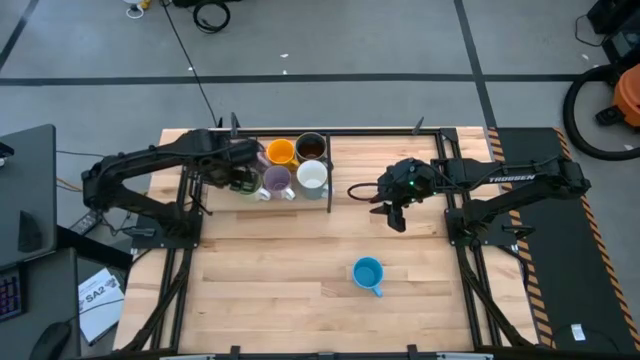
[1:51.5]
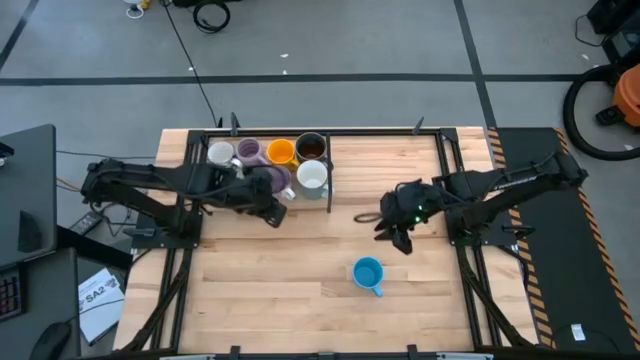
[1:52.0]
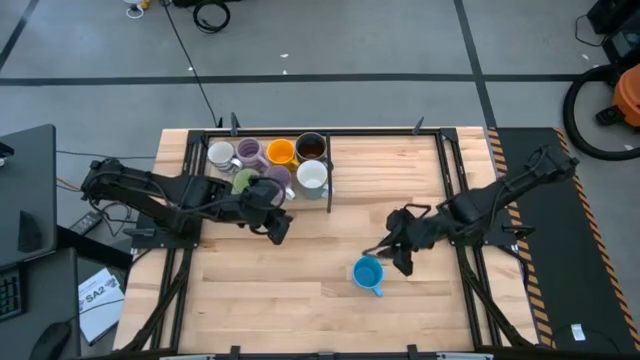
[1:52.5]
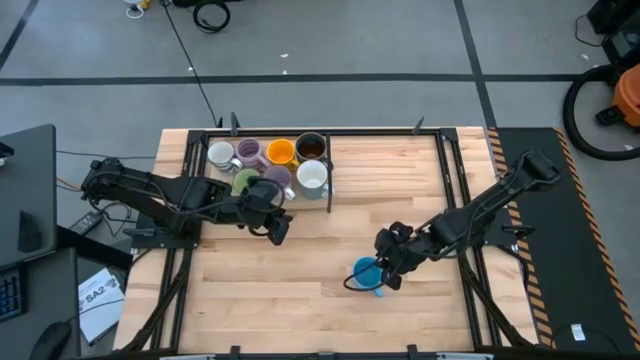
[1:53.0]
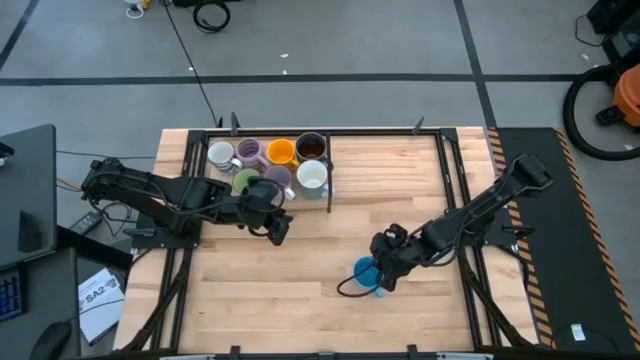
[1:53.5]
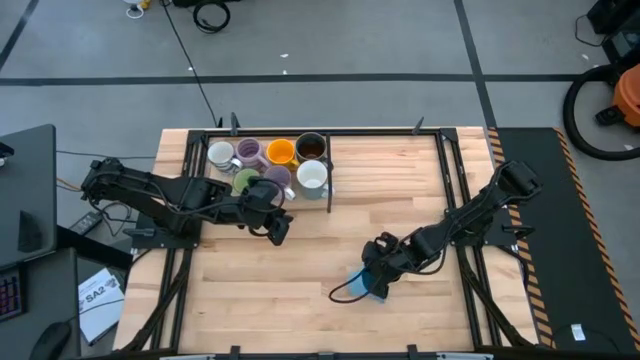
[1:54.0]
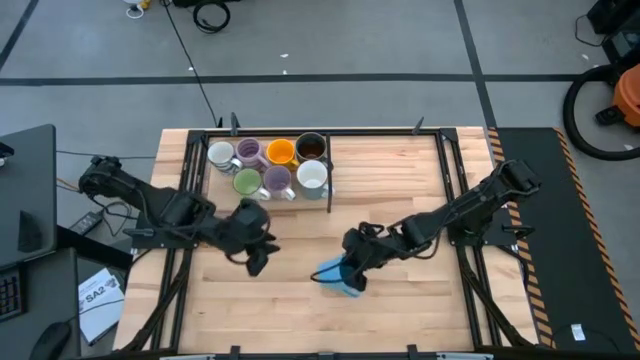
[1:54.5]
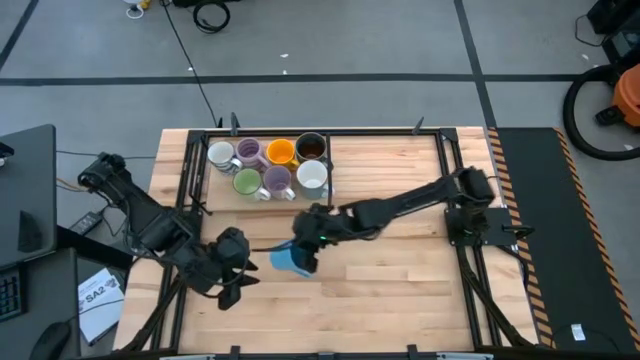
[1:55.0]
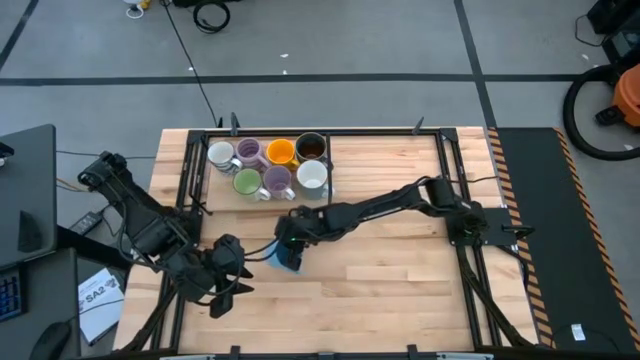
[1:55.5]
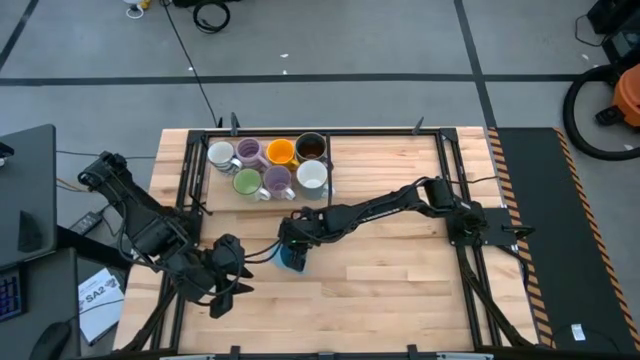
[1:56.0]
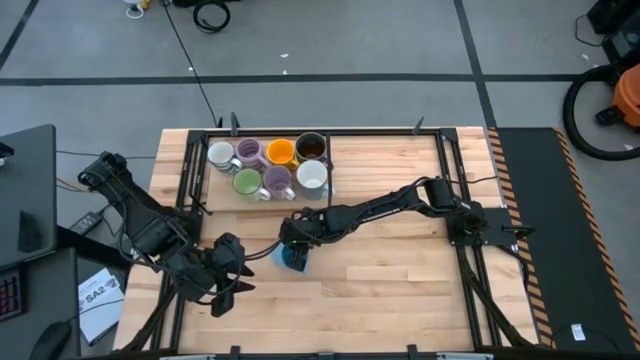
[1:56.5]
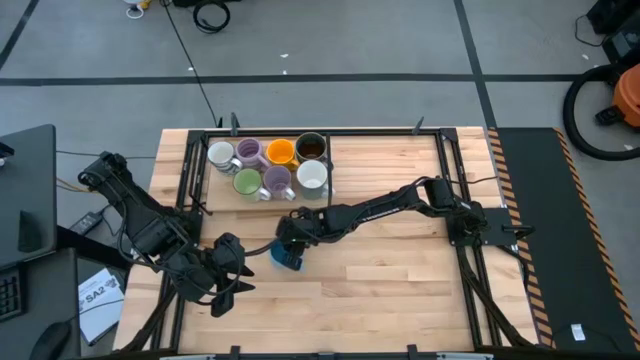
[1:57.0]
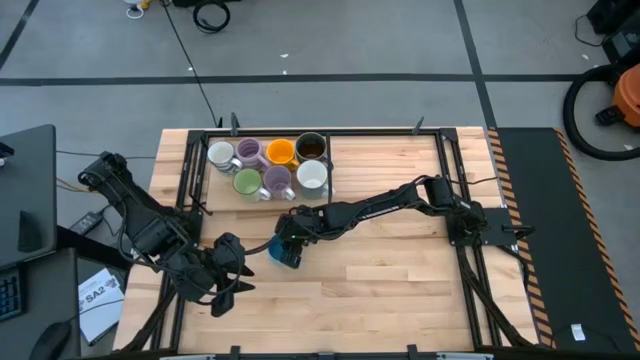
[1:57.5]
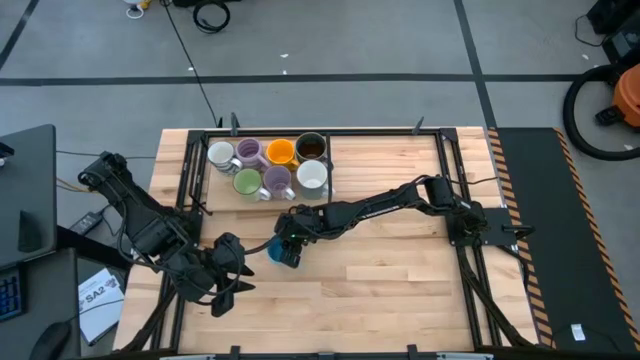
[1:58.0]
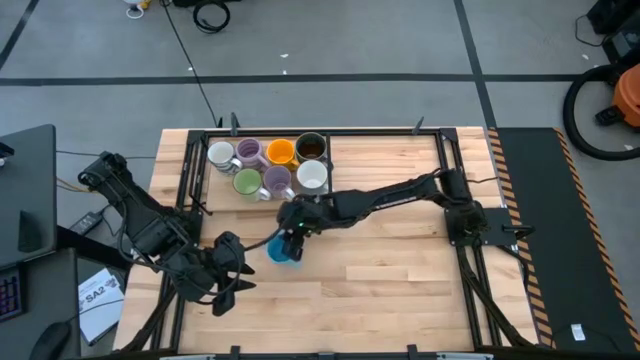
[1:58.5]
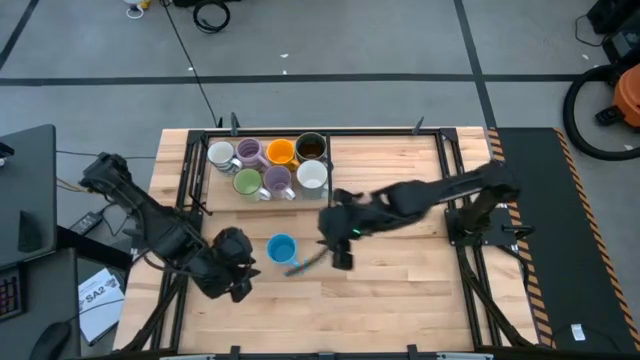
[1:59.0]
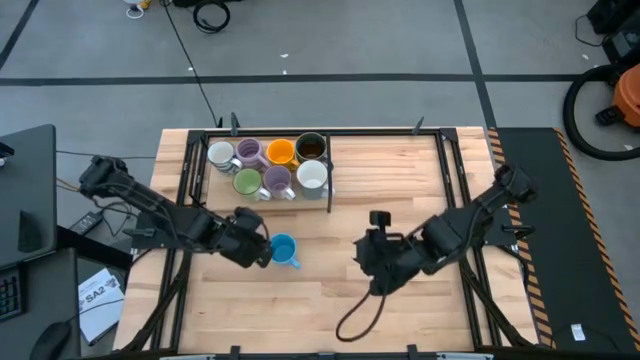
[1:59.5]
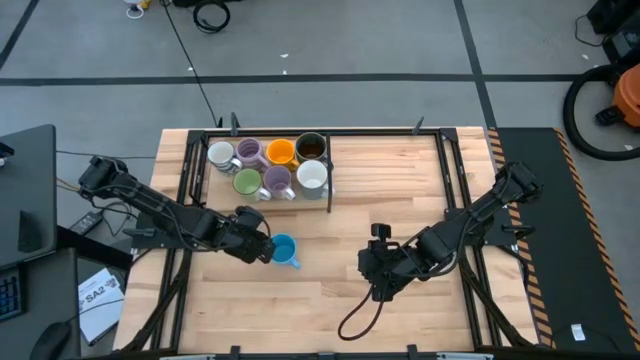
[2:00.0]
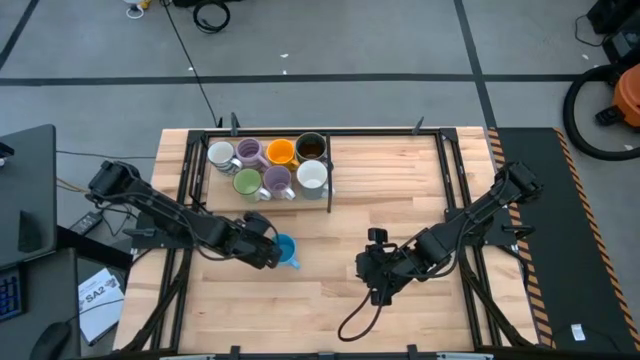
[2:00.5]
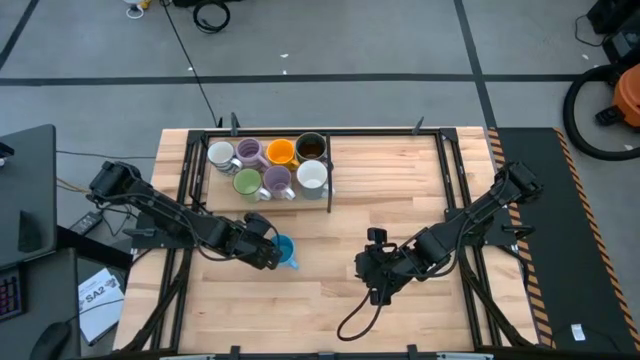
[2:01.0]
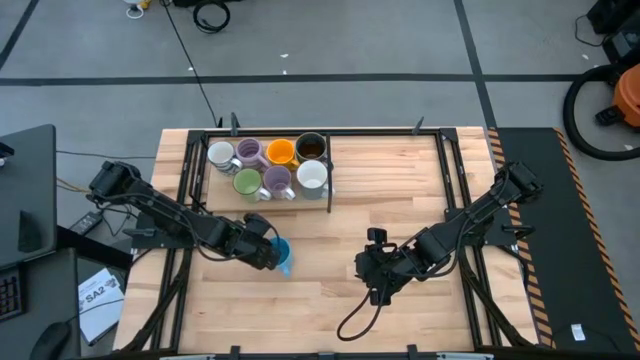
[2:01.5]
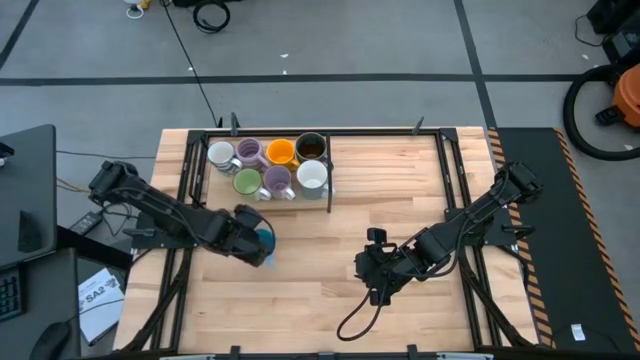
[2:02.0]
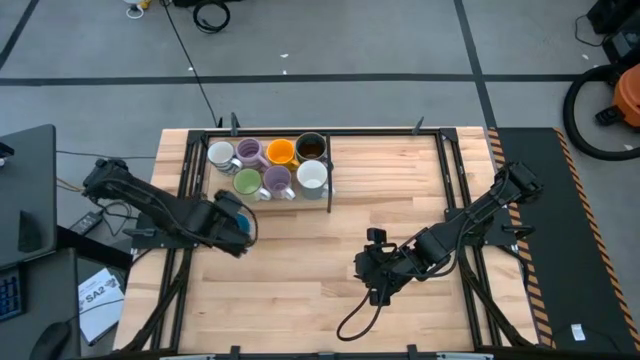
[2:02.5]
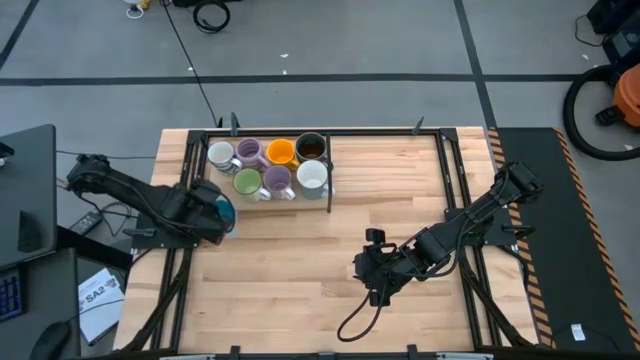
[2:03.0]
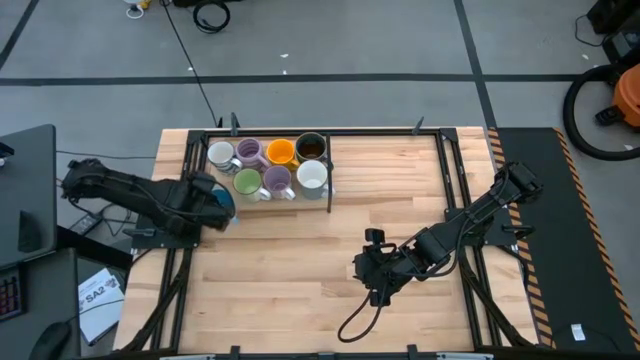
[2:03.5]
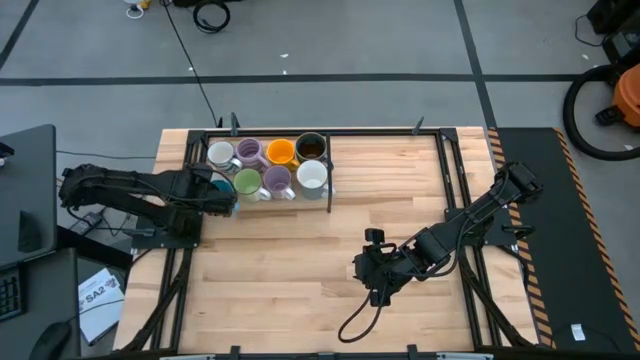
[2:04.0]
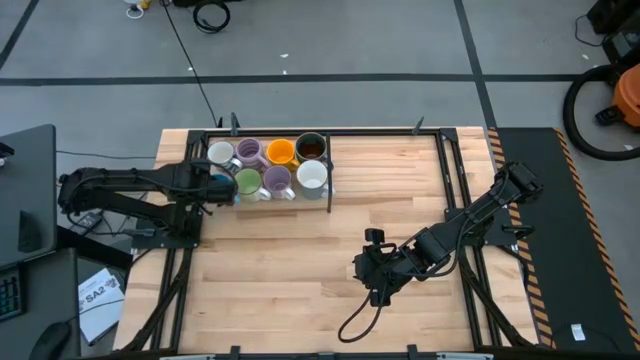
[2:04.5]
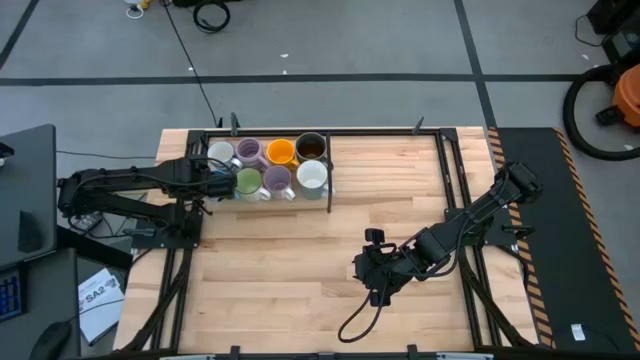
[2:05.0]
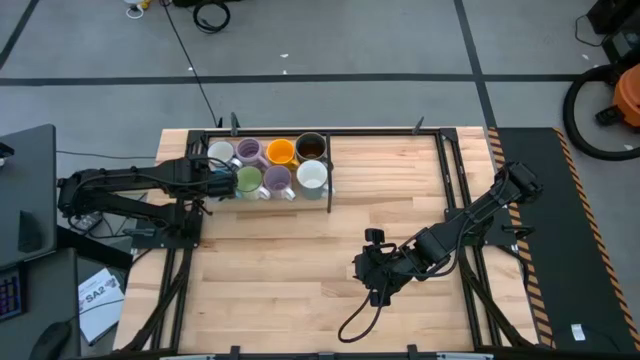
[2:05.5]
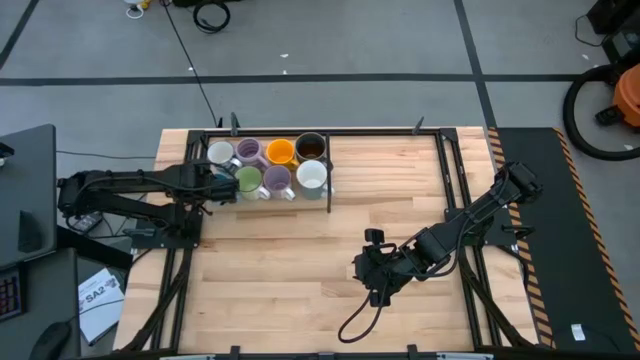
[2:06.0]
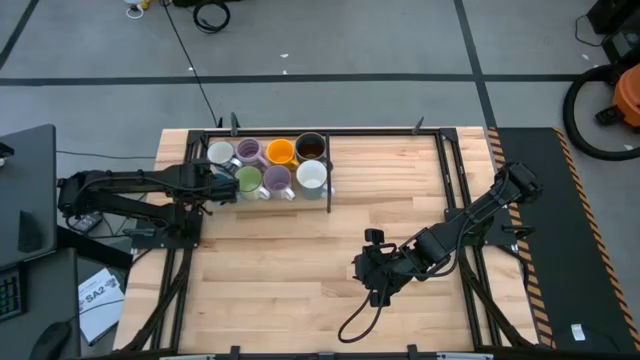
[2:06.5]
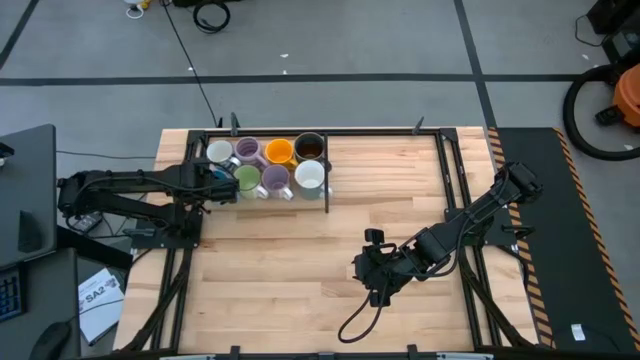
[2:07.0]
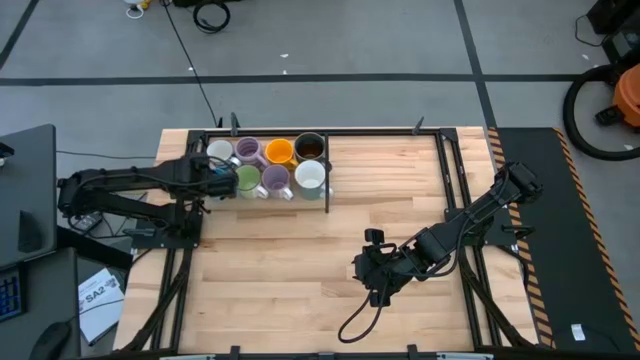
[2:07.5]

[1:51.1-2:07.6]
Task: Place coffee mugs
Put the blue mug on the shelf

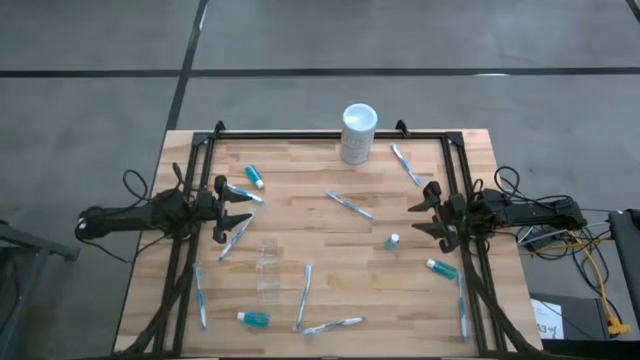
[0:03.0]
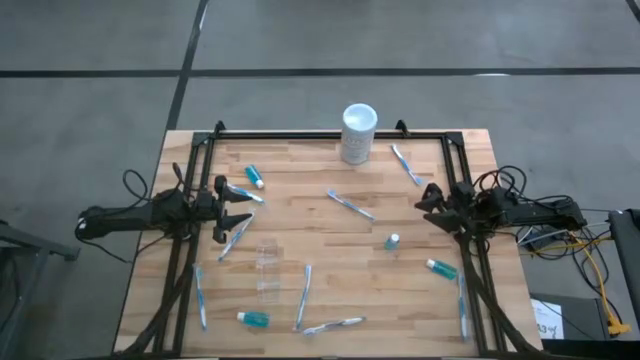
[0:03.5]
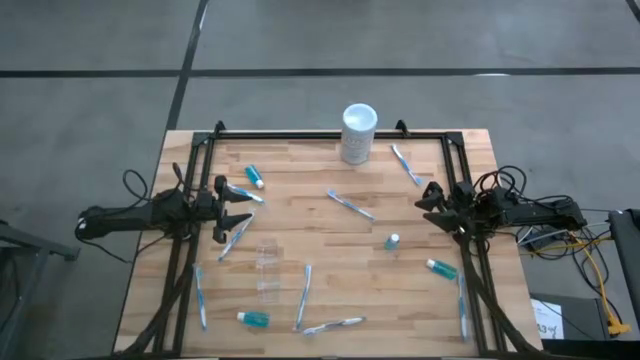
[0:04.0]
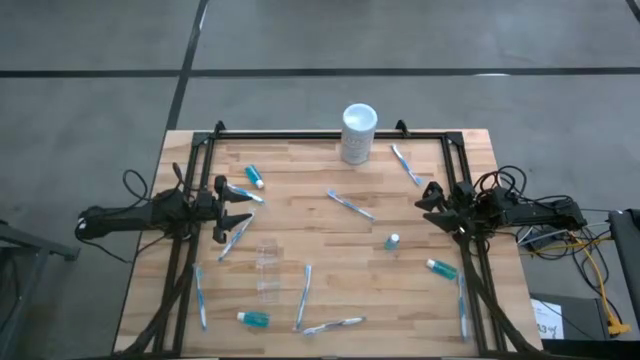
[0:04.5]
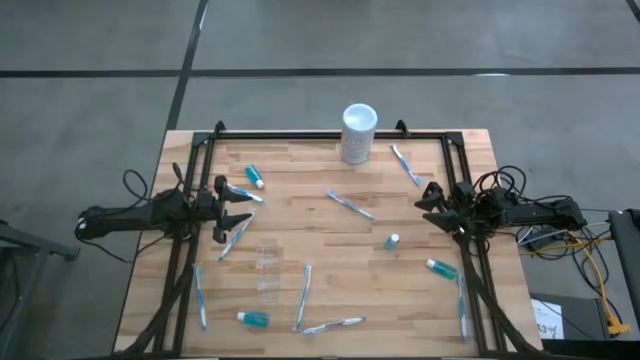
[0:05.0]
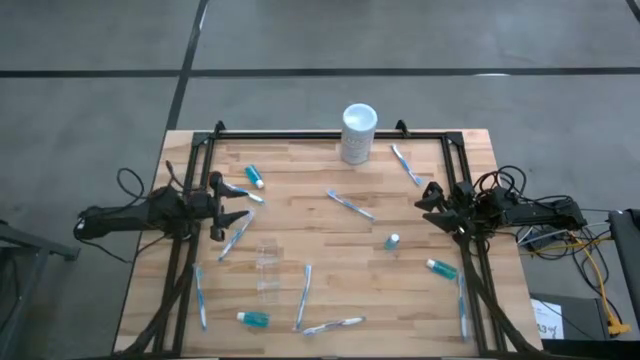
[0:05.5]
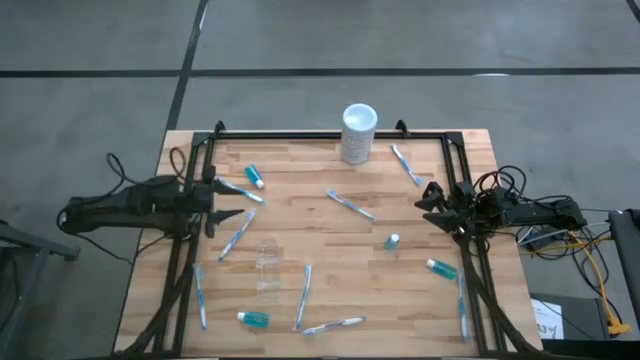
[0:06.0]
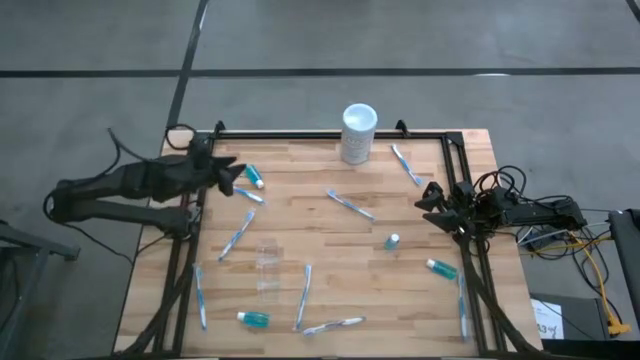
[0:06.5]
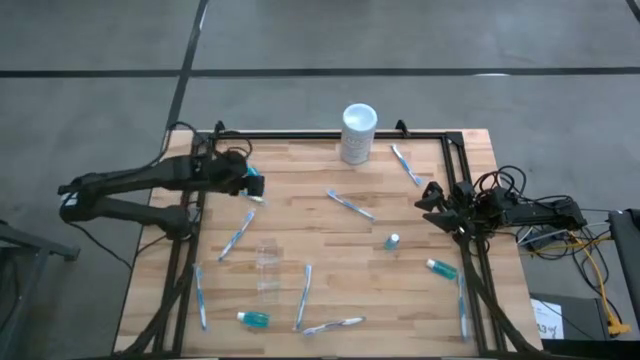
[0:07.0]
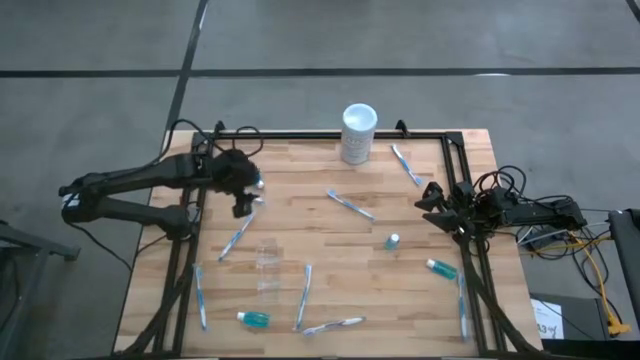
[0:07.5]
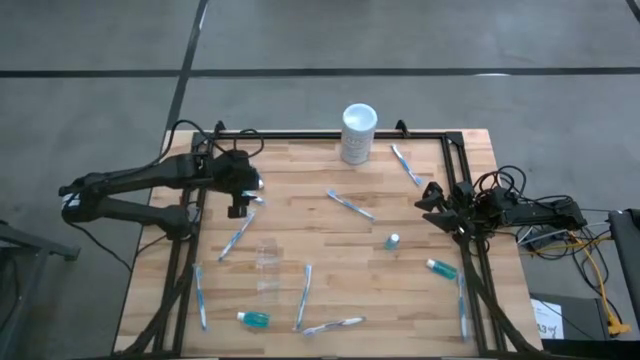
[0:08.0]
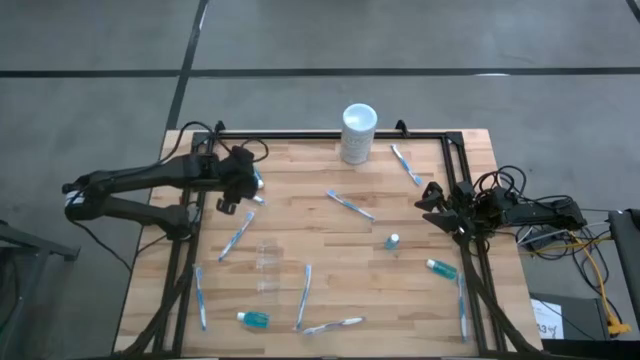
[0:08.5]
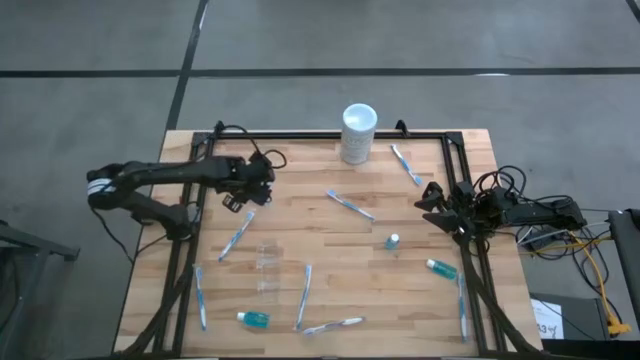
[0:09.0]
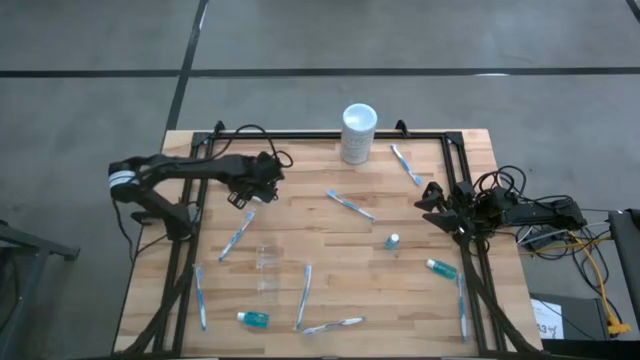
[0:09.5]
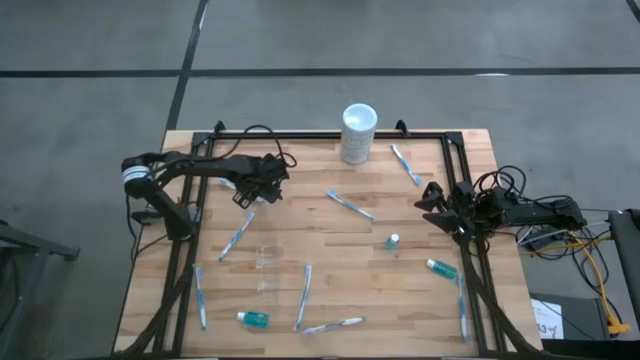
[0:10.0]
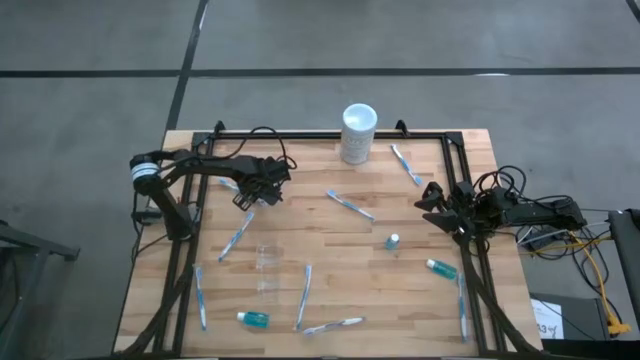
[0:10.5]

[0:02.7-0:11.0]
Task: Pick & Place toothbrushing station
Put the blue mouthwash bottle into the transparent organizer
